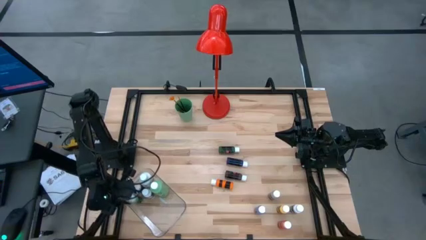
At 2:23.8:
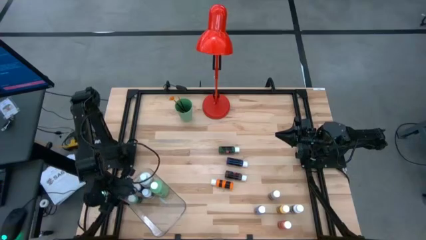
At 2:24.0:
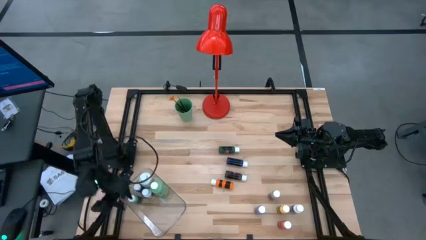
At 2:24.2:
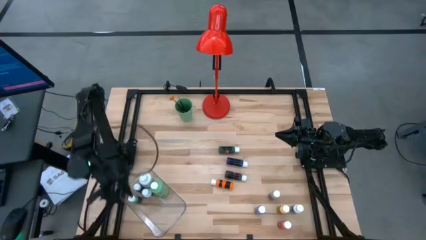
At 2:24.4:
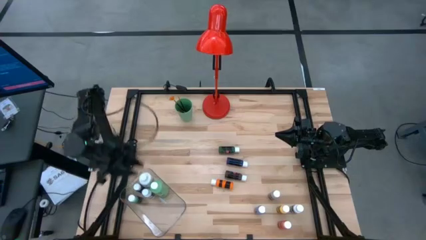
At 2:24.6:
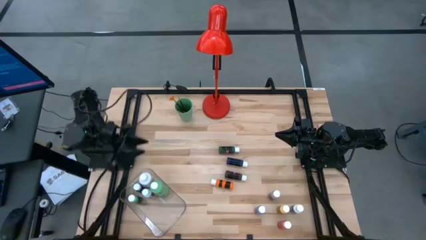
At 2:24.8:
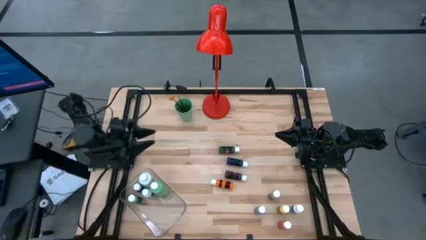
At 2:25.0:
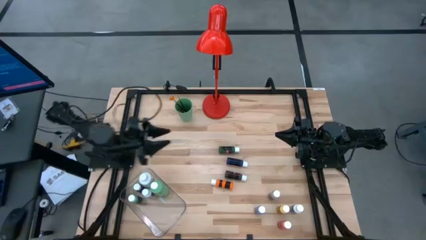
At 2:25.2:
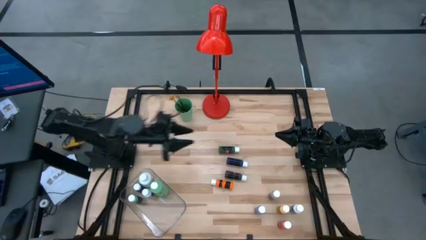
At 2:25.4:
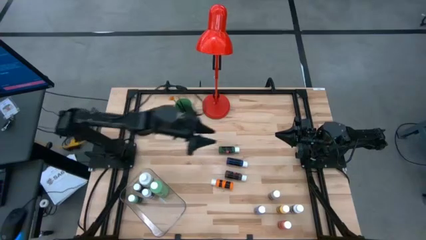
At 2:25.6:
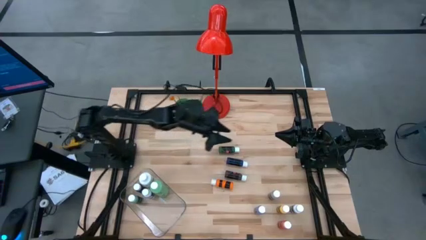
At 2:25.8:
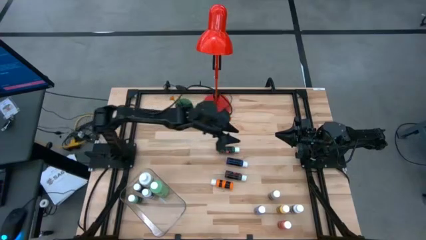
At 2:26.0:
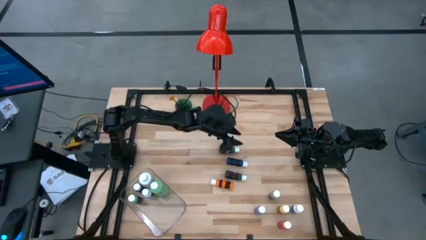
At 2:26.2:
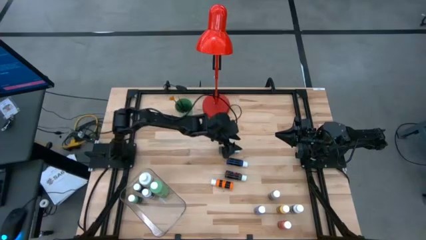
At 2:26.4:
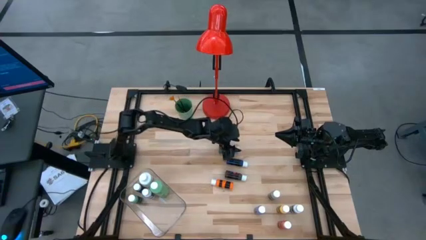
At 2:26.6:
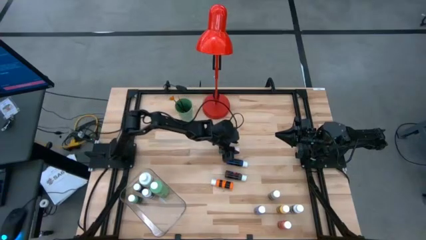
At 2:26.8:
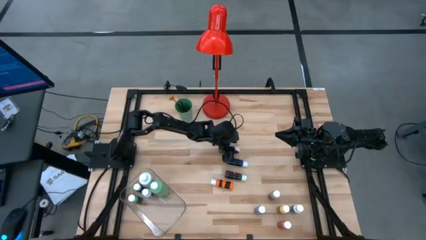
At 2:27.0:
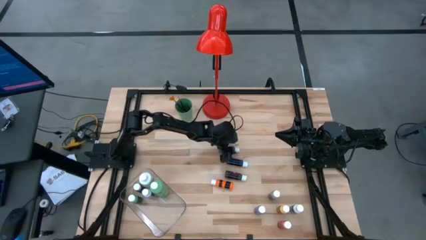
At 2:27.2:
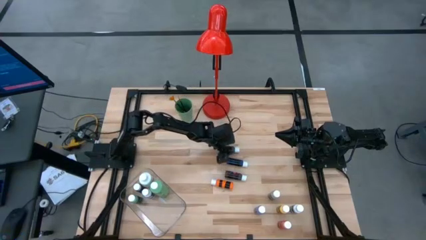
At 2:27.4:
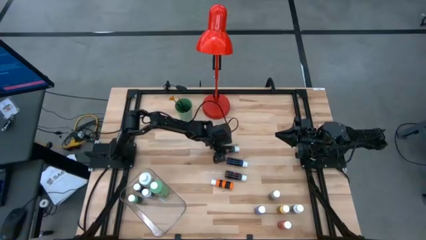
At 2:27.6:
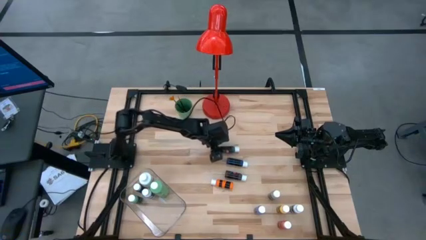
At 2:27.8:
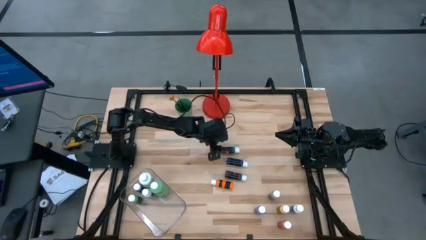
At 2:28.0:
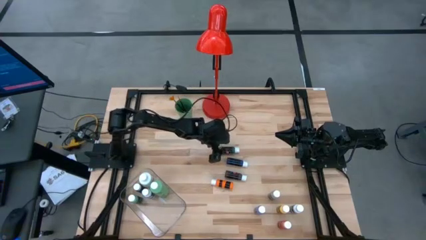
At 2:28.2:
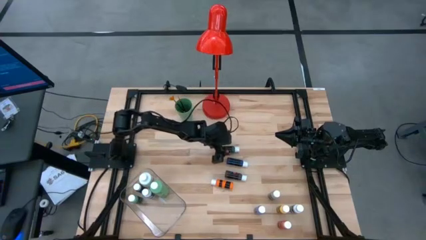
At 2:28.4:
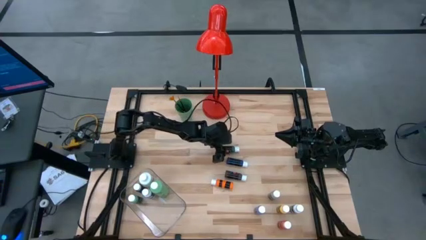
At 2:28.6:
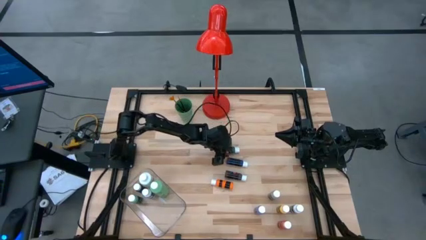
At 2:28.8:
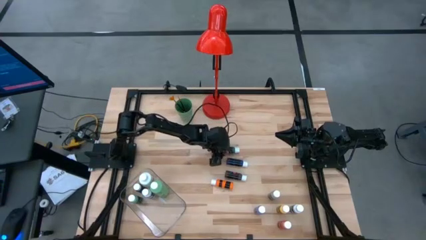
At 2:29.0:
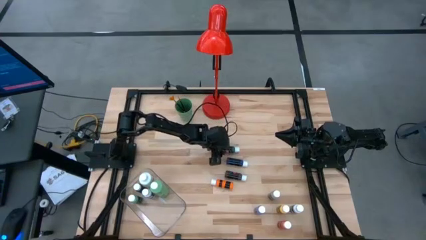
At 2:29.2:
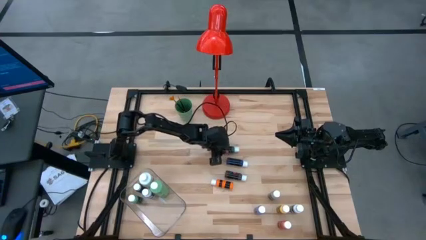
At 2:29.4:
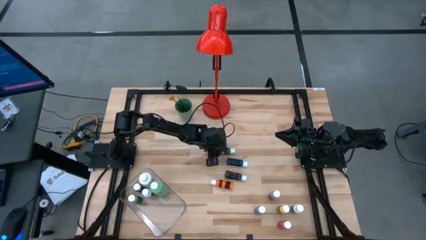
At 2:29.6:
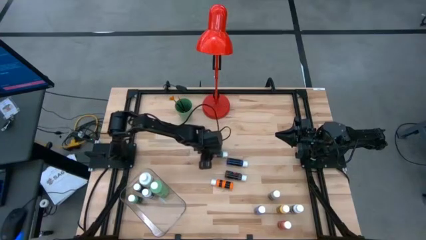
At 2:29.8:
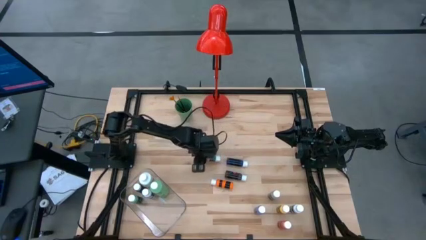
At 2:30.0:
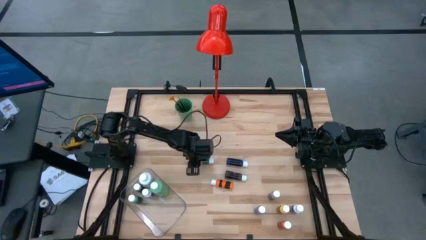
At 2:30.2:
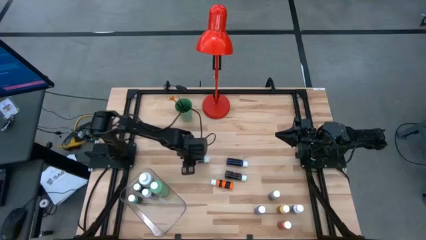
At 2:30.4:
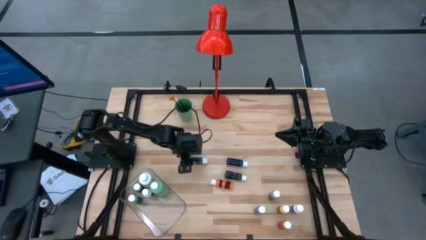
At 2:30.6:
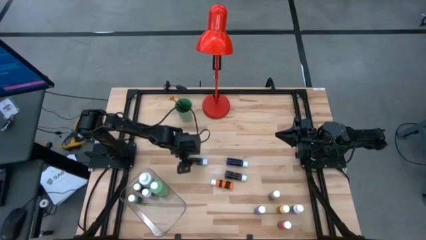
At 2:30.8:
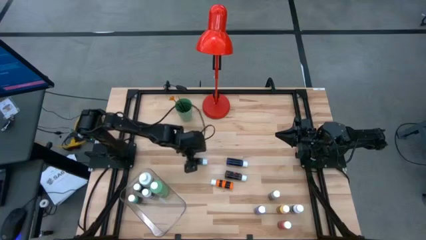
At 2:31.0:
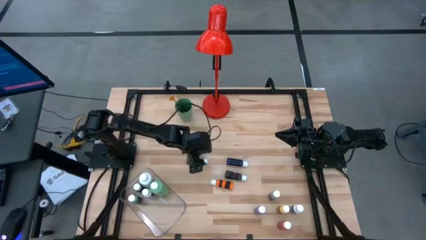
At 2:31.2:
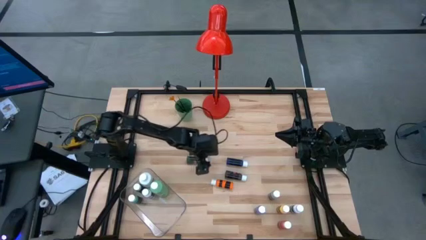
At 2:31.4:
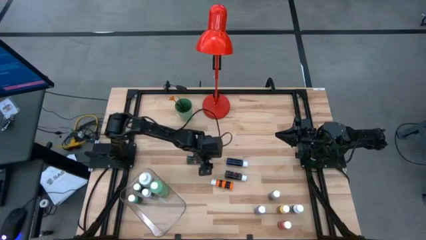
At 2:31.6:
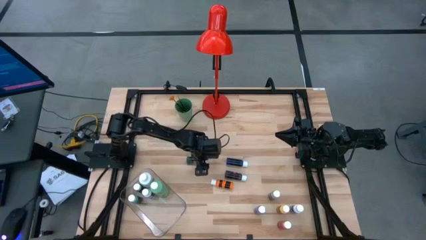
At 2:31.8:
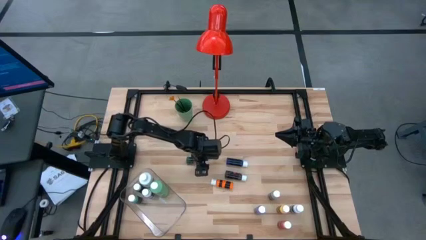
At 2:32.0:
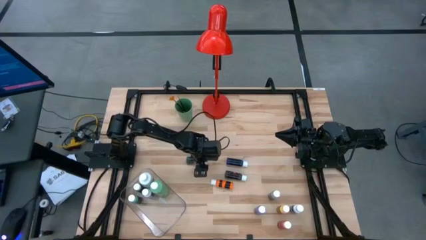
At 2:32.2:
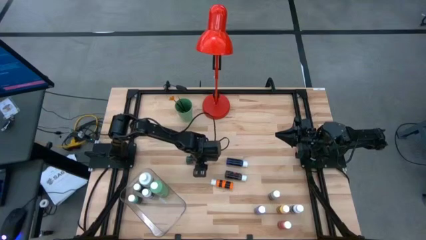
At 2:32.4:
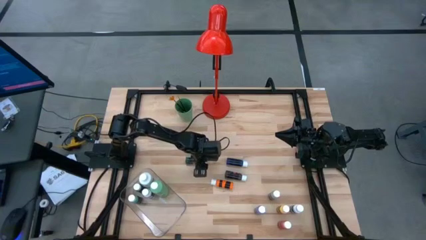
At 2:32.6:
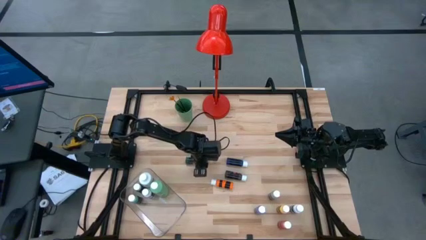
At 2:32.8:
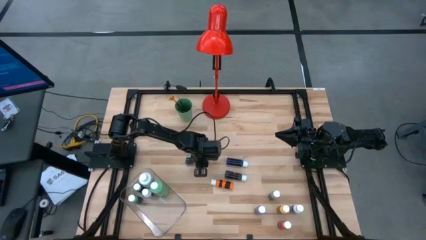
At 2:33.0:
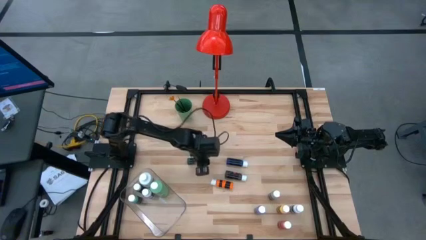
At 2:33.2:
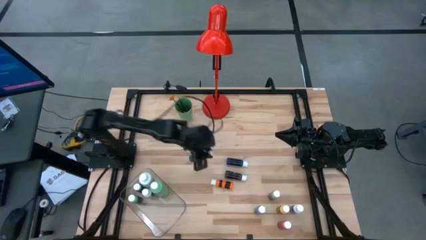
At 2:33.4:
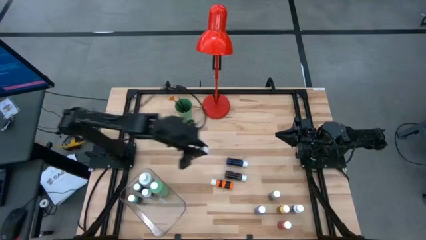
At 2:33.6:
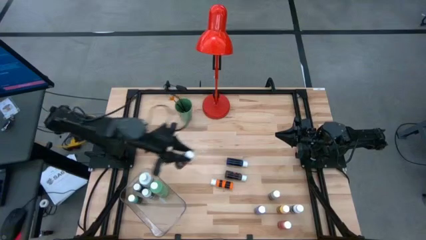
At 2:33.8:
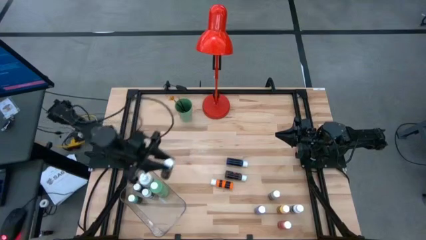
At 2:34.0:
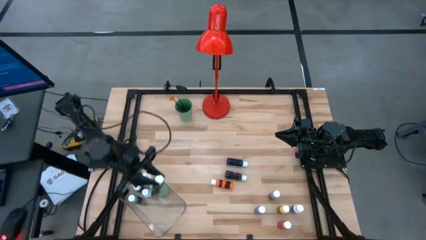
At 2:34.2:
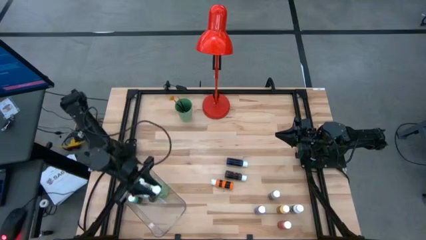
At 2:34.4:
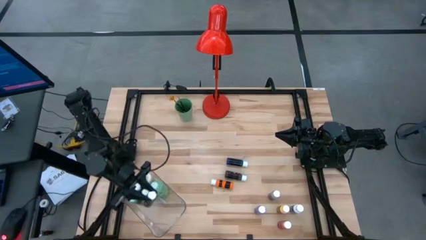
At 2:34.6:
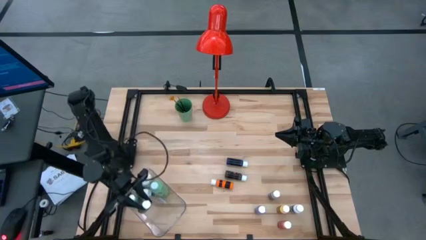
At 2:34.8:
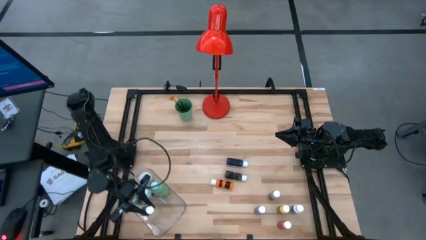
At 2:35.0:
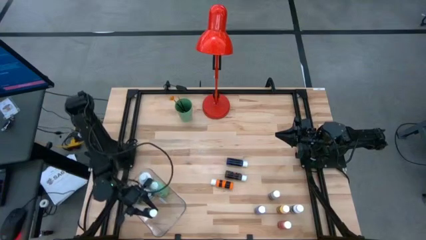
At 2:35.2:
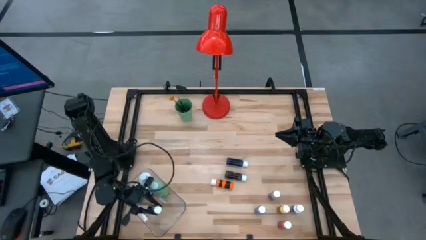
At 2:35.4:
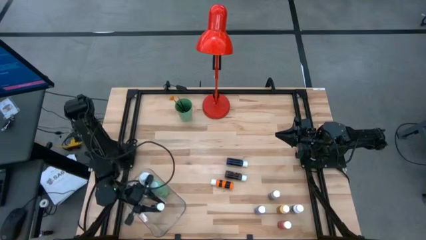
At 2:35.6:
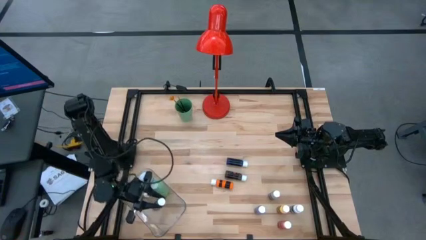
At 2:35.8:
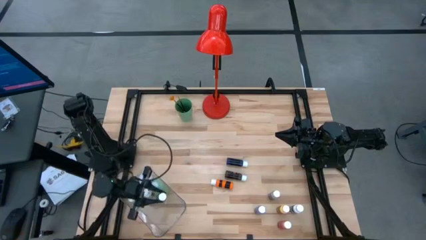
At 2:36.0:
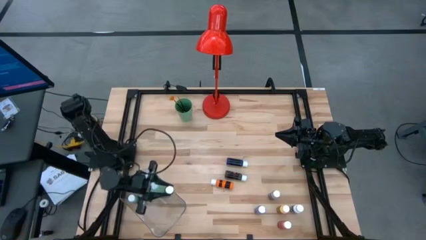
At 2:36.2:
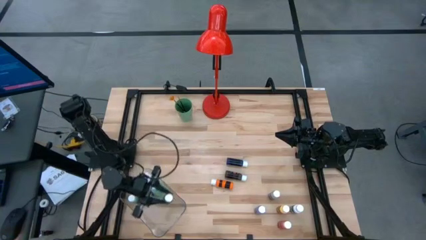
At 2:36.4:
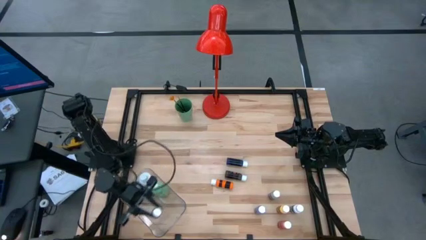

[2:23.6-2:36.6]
Task: Pick & Place Paint Supplies
Put the green coloring bottle into the transparent bin

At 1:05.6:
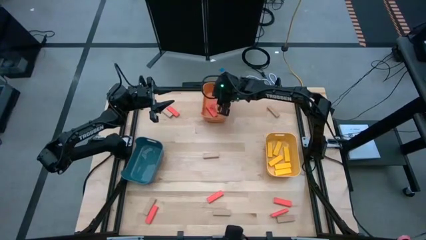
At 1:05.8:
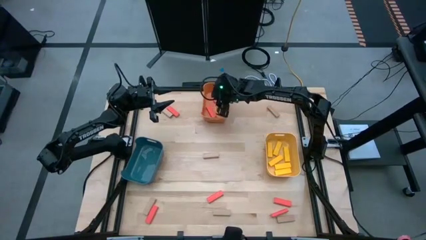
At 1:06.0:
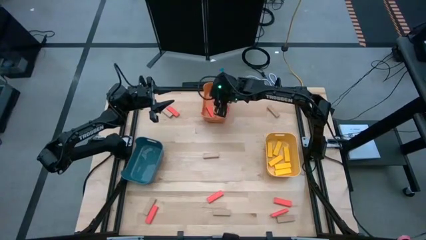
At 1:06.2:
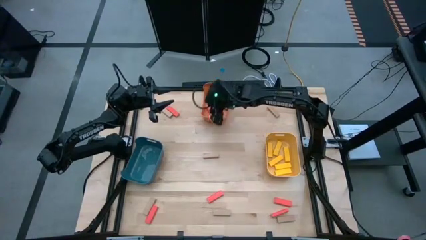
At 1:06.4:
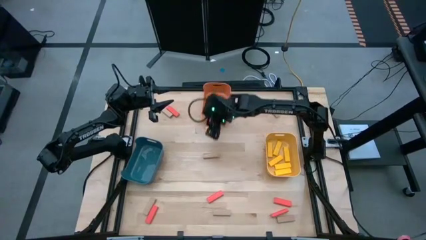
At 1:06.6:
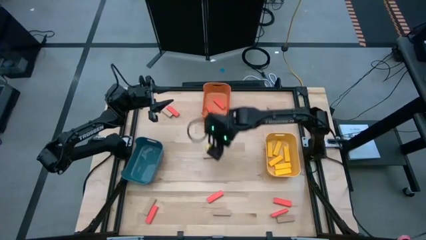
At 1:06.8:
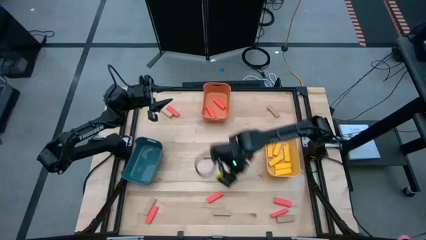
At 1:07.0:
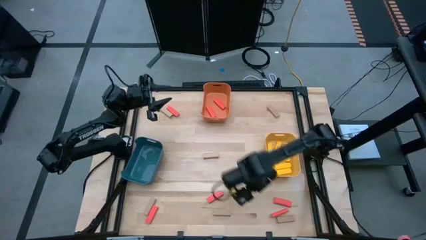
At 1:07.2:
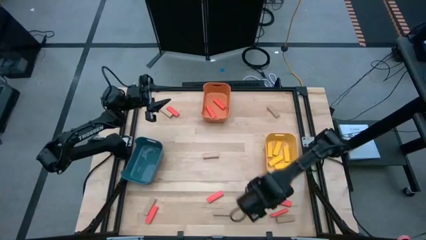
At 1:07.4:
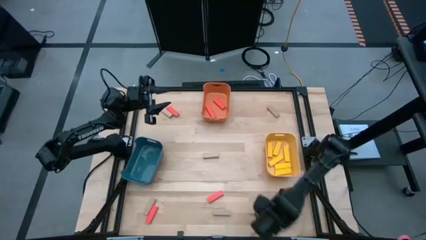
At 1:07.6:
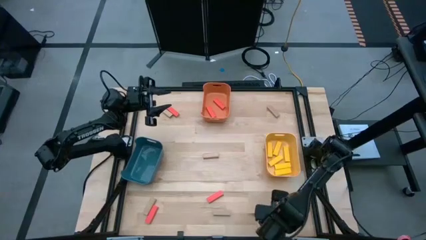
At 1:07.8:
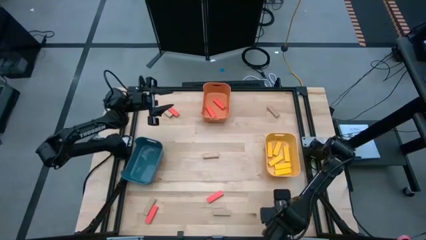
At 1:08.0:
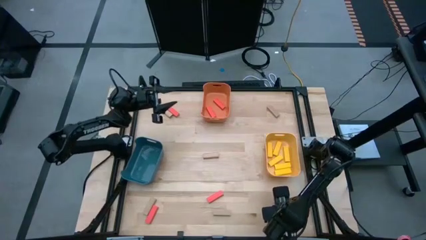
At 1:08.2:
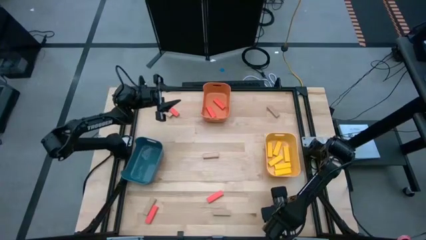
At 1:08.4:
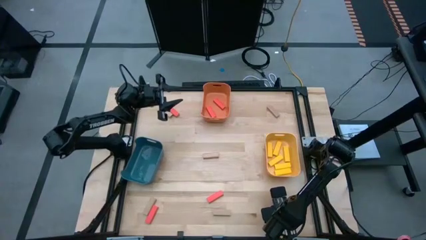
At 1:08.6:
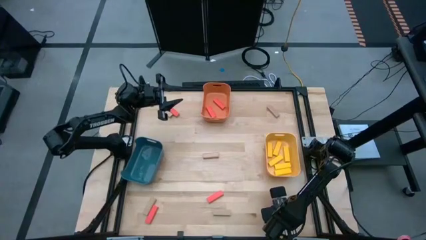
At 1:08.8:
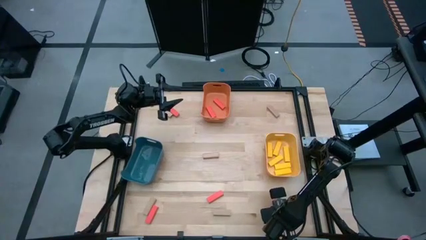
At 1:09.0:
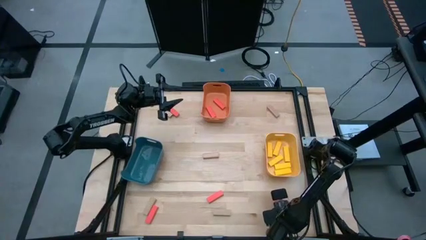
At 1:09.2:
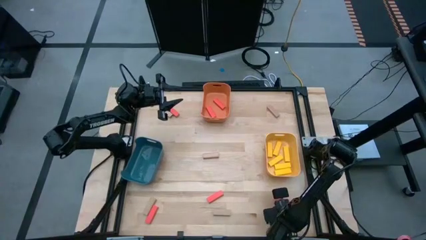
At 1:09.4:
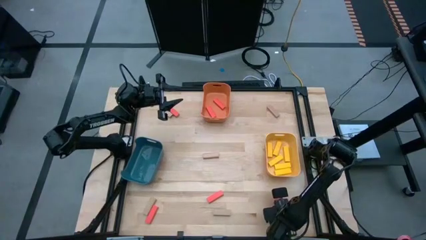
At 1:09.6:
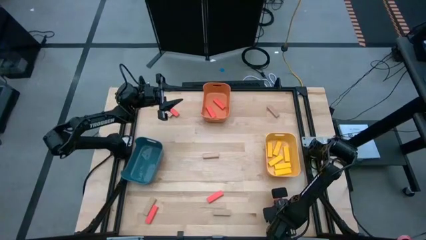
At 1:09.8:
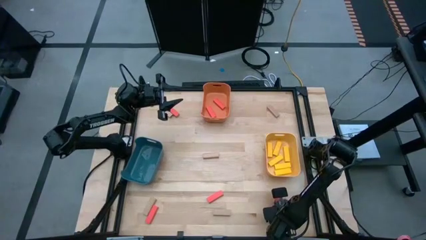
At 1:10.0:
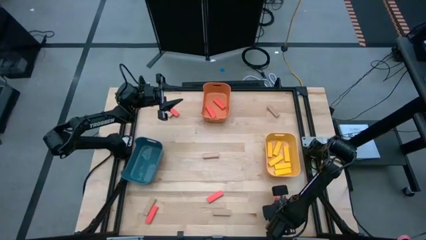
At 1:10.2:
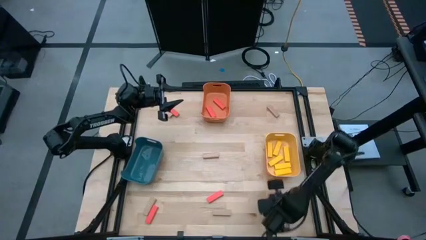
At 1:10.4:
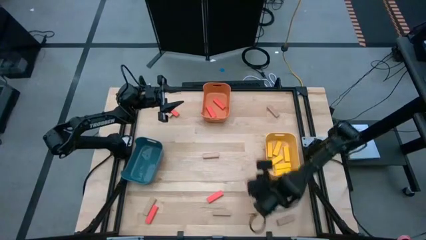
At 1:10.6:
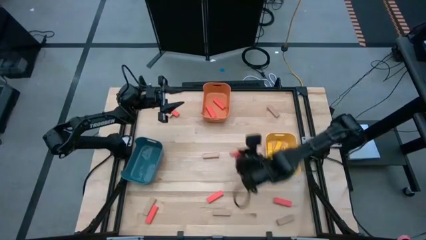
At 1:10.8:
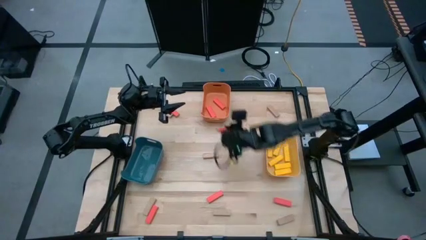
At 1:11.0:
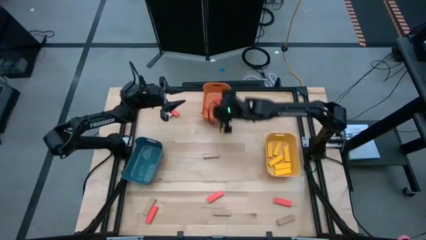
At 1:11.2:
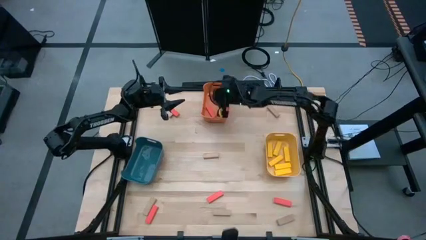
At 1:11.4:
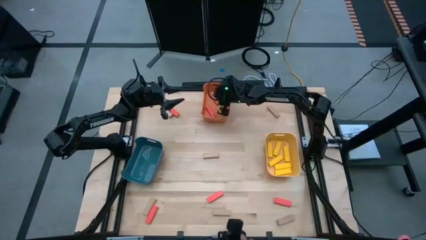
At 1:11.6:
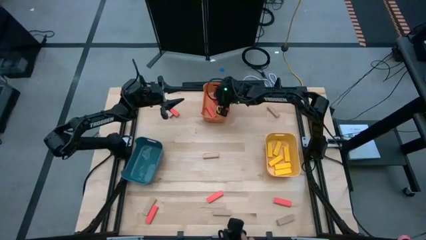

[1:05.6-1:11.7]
Task: Sort blocks
Put the bottom right orange block into the orange bin
